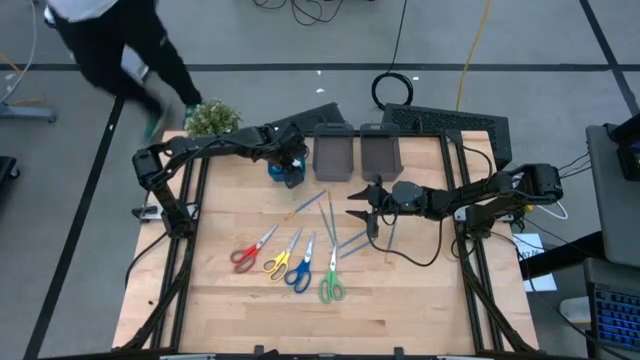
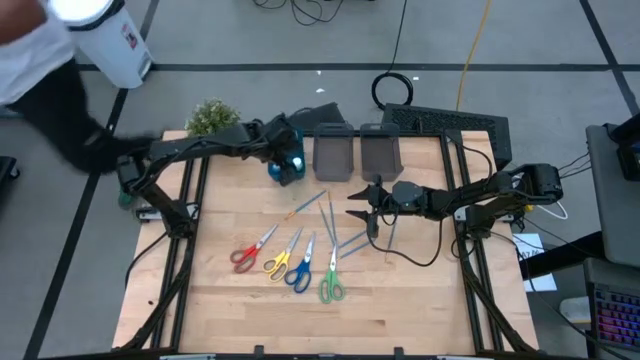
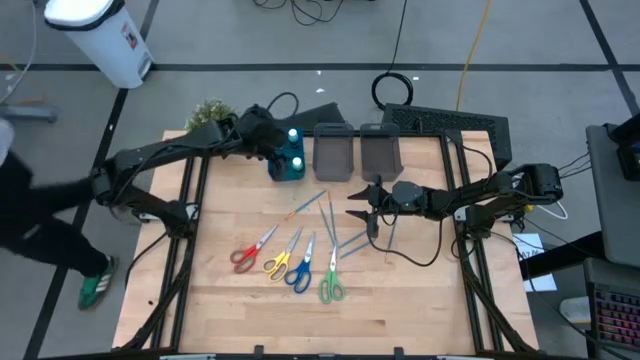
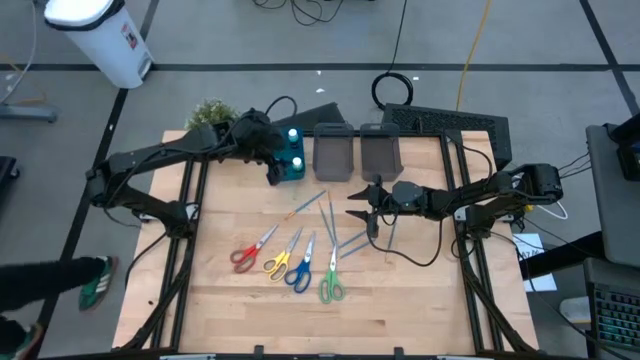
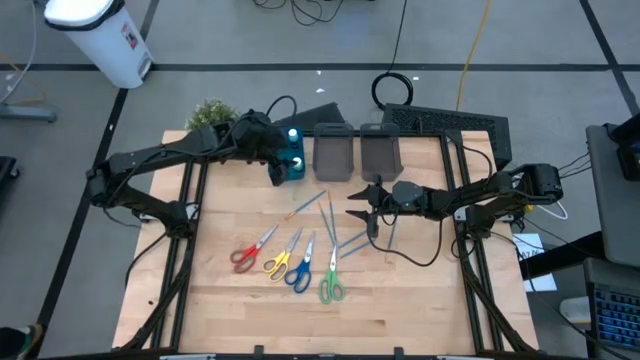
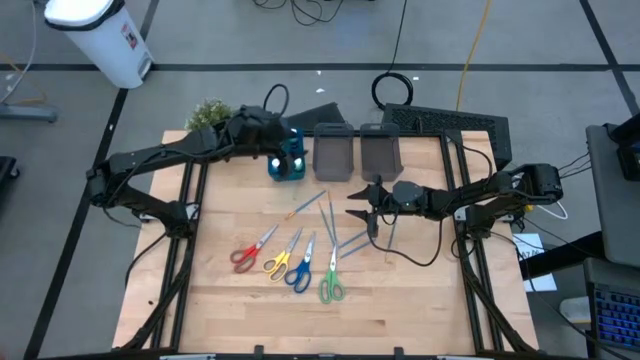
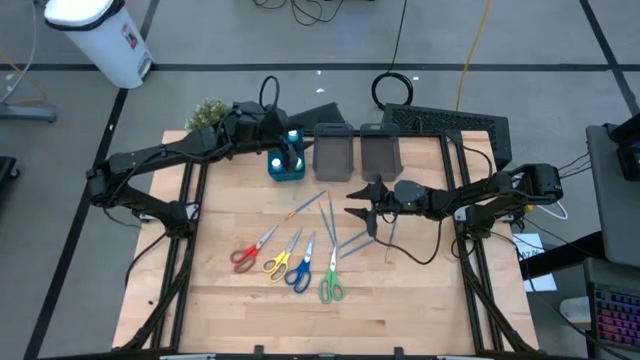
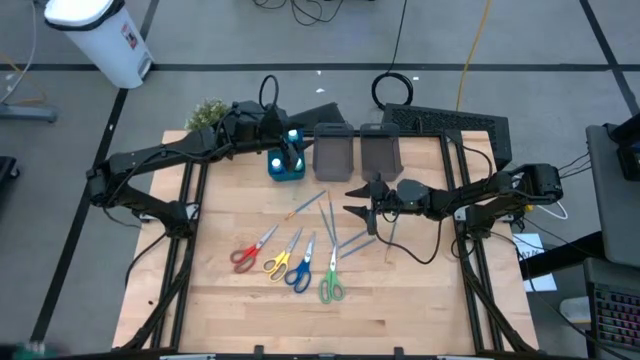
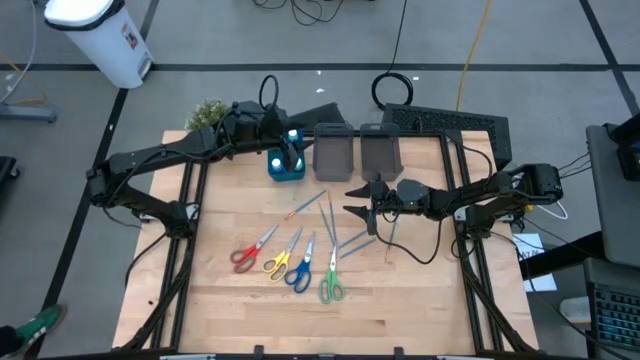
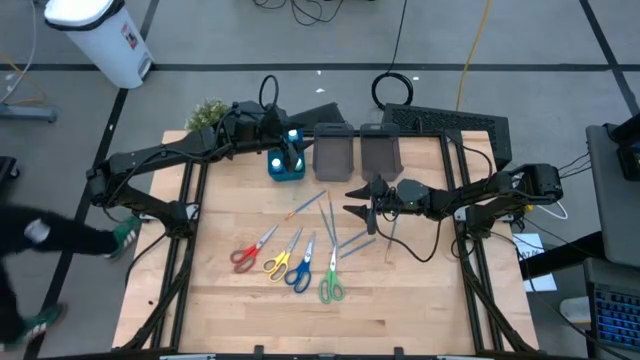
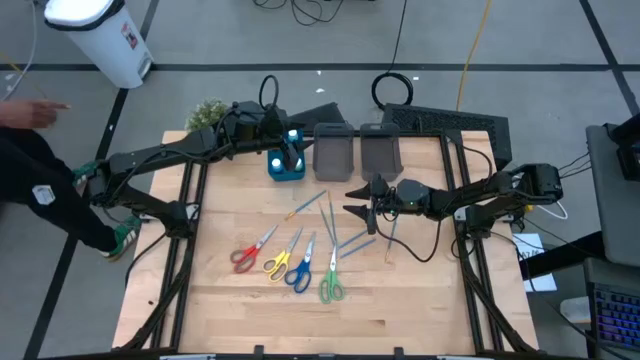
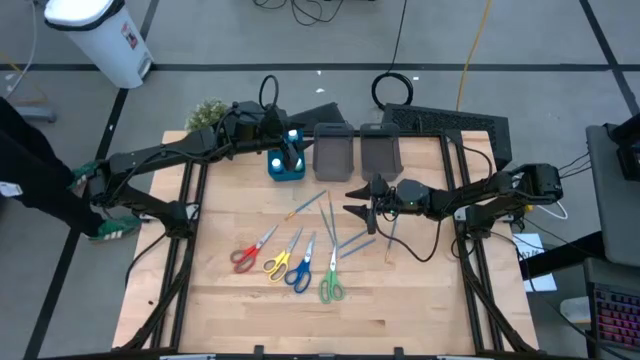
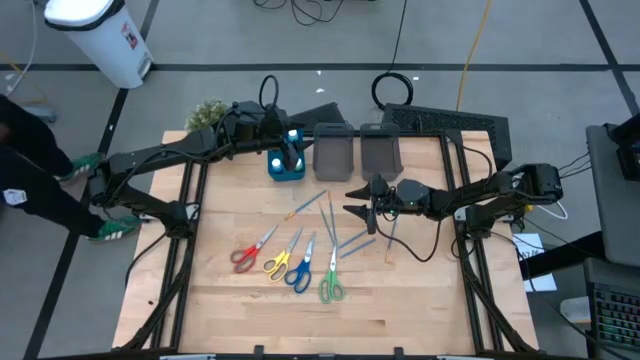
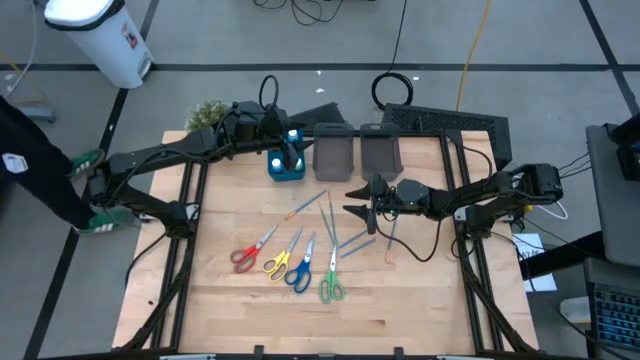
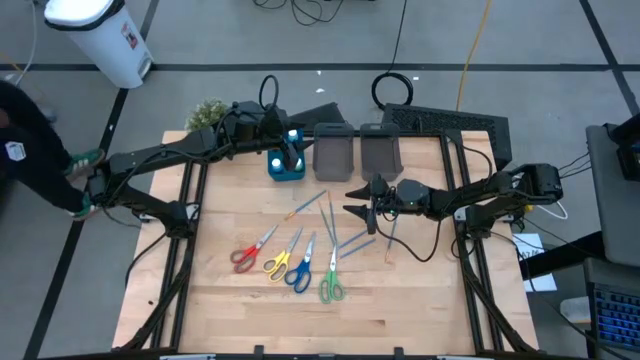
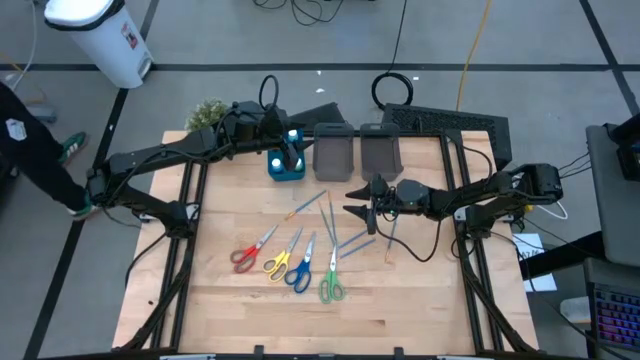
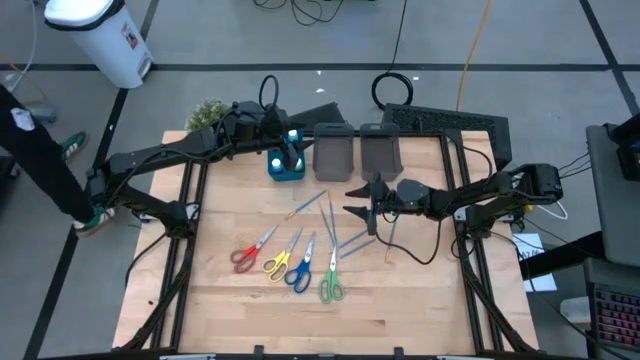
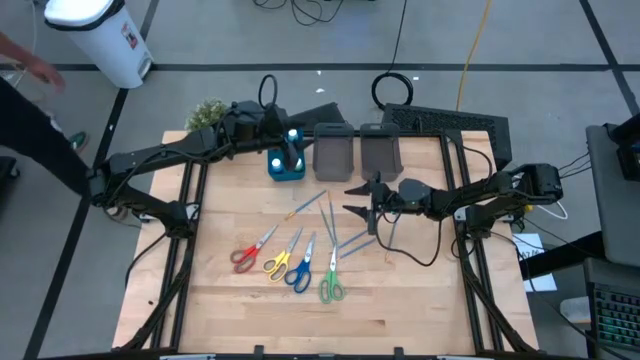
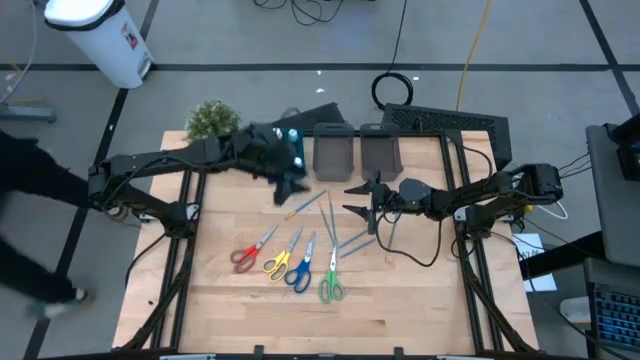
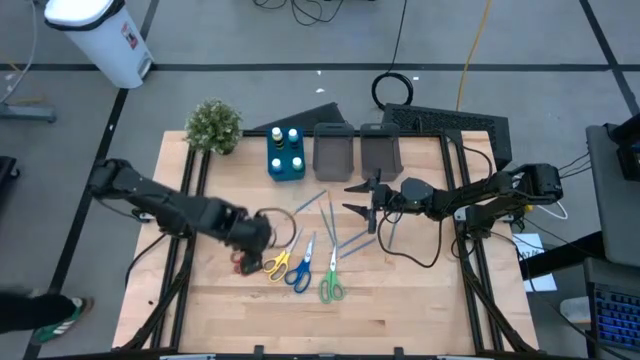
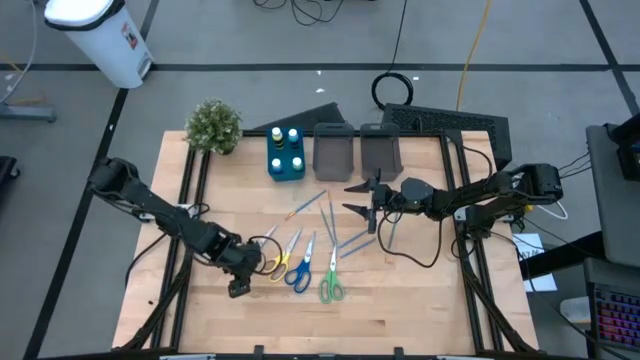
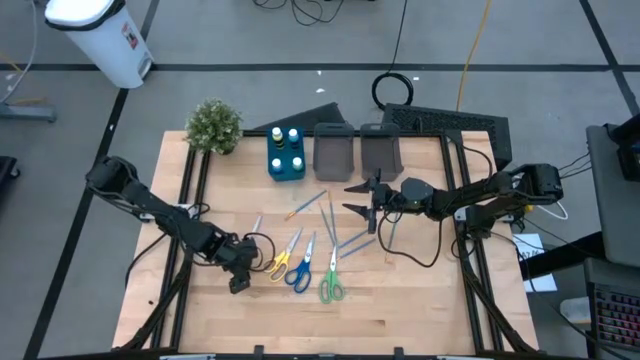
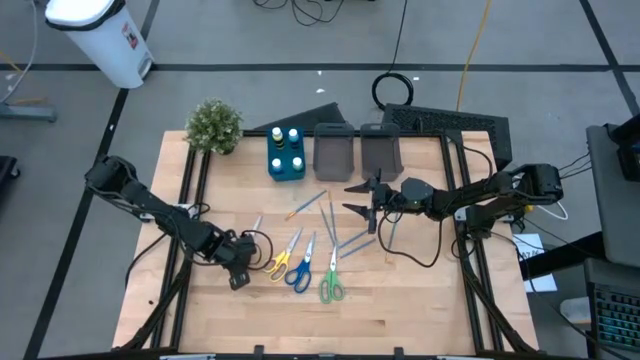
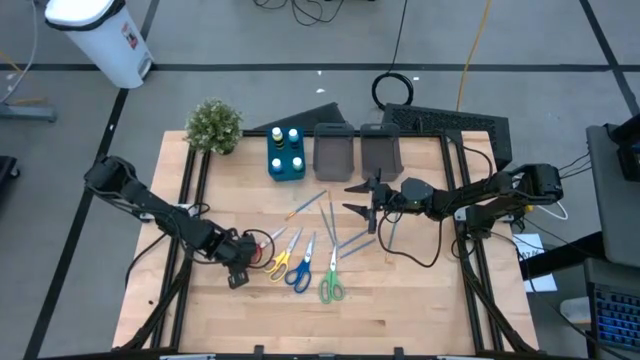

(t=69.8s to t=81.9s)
Task: Pick & Place Paint Supplies
Put the red scissors into the left black bin

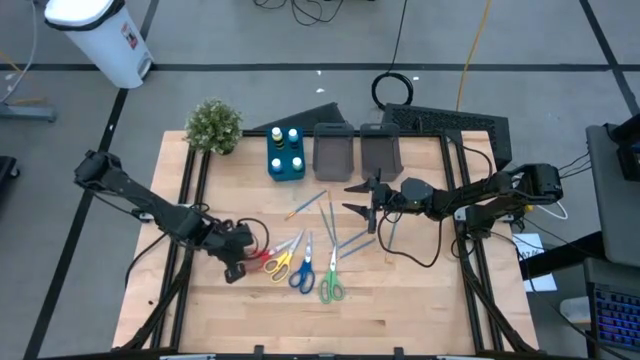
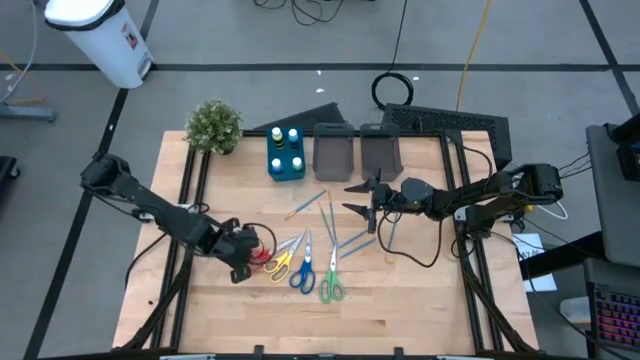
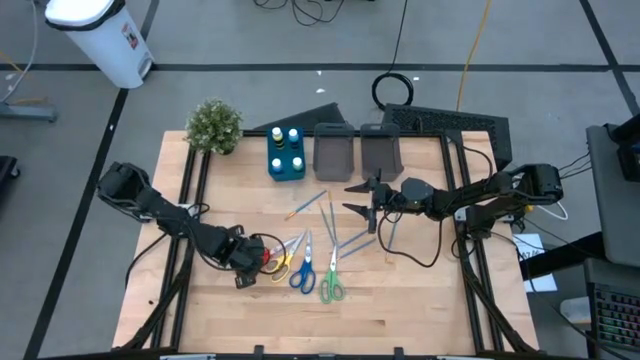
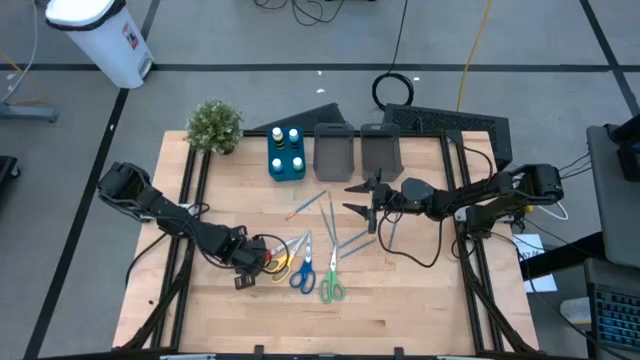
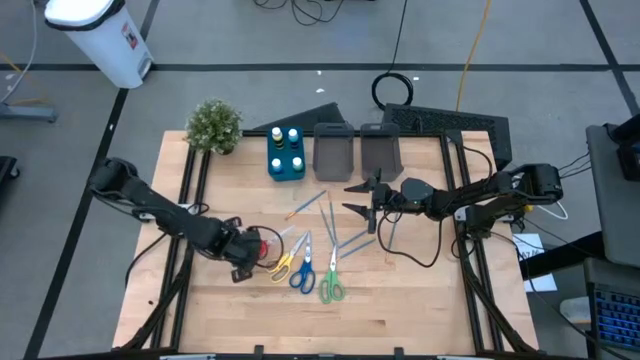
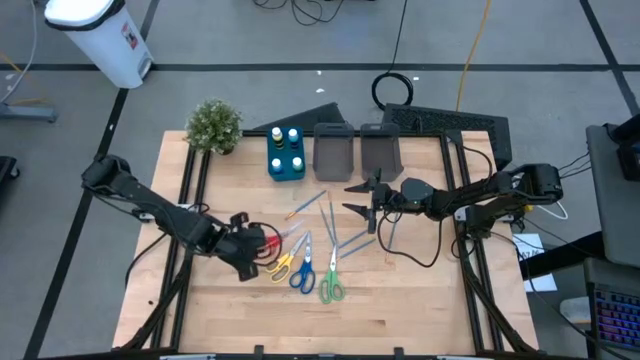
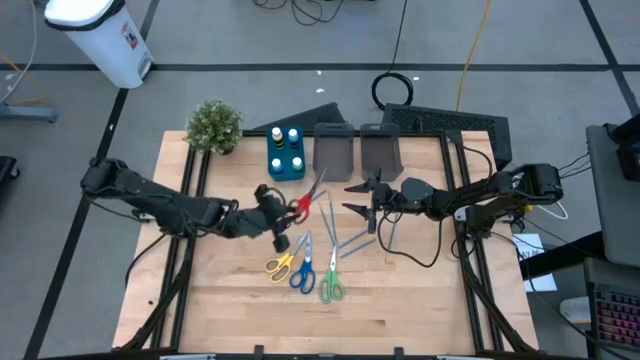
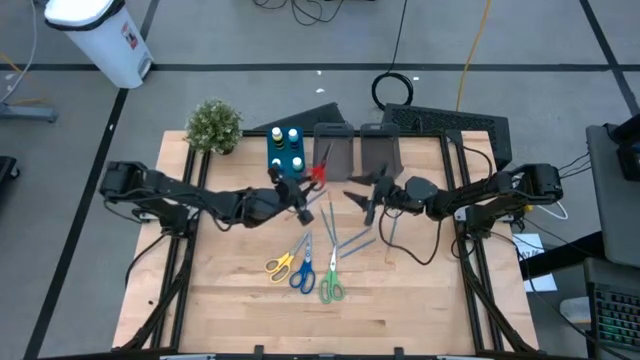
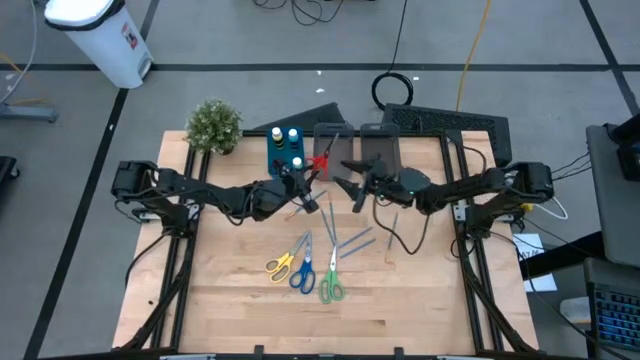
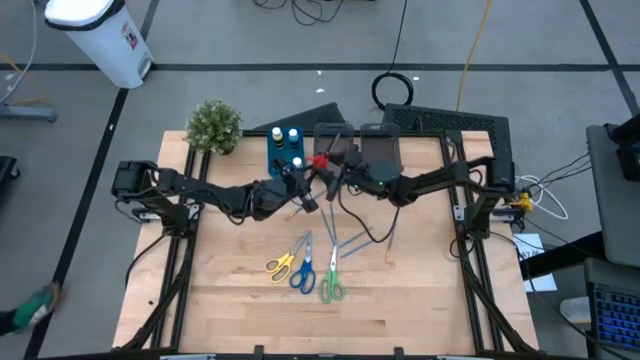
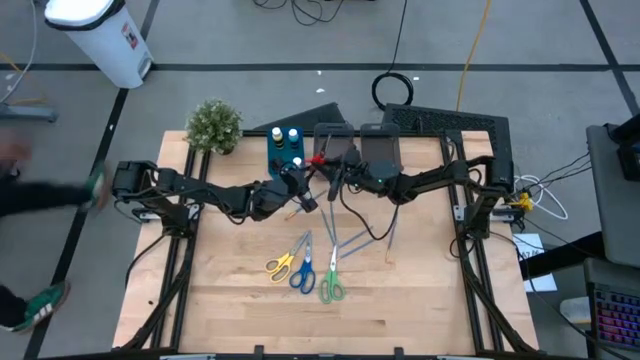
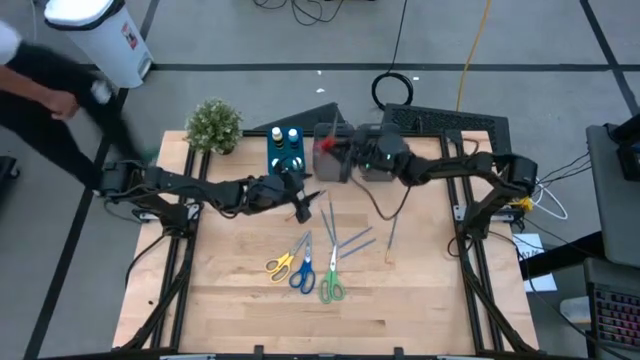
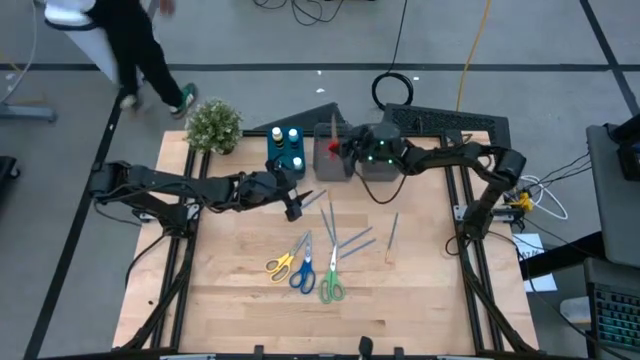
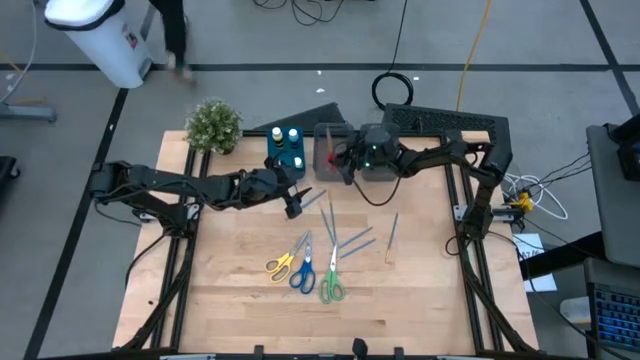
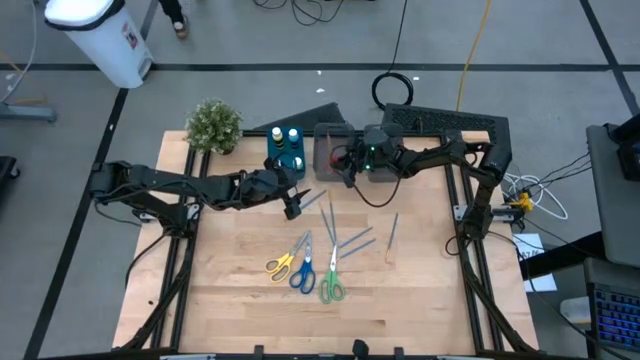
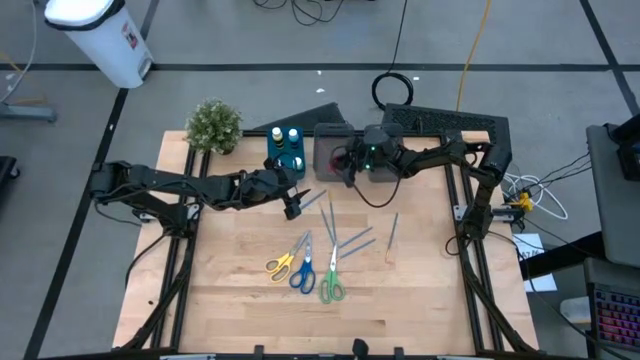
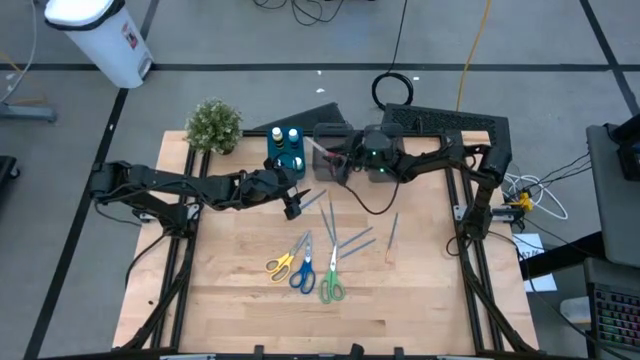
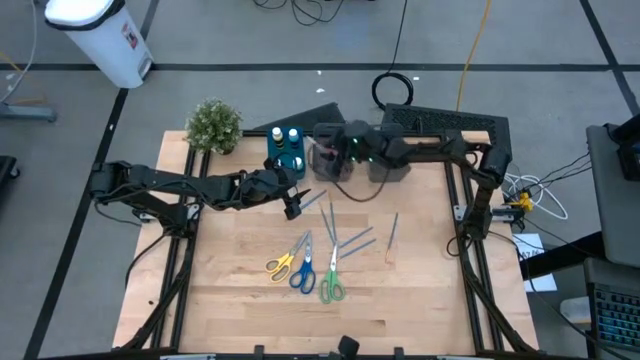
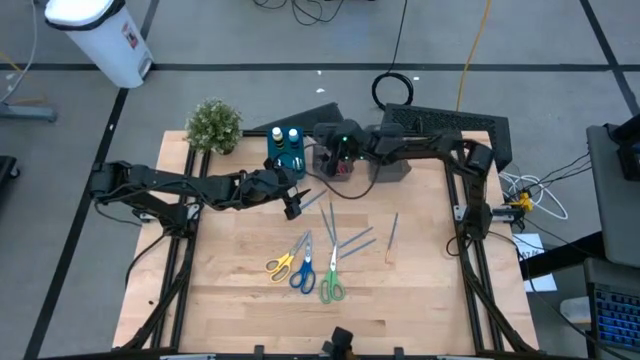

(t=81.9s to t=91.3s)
Put the red scissors into the left black bin

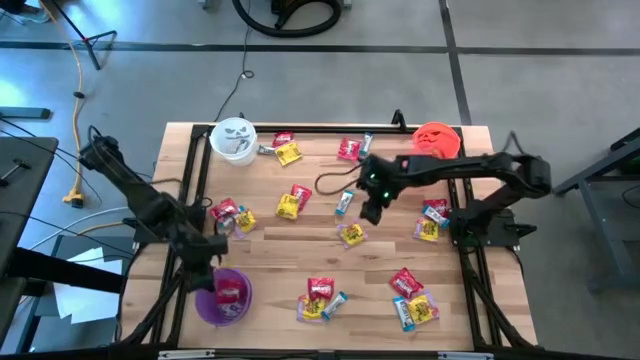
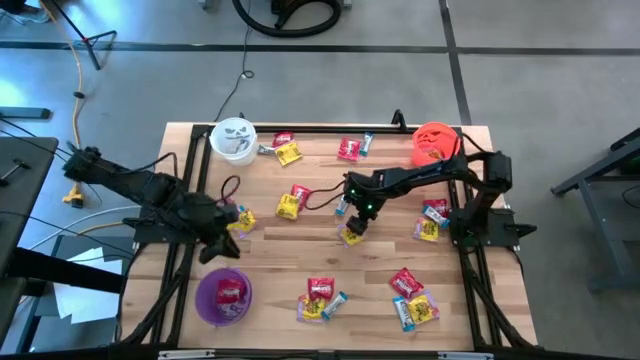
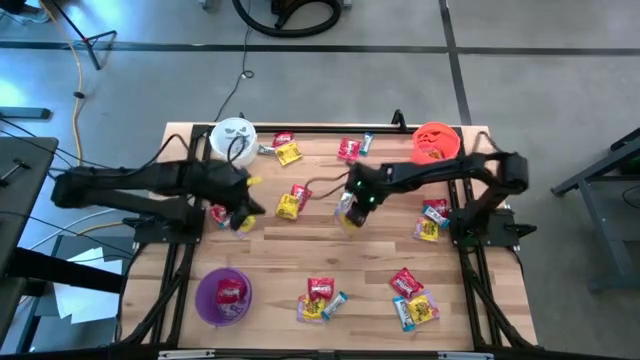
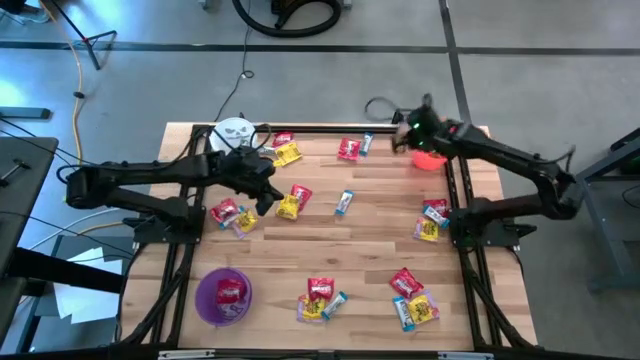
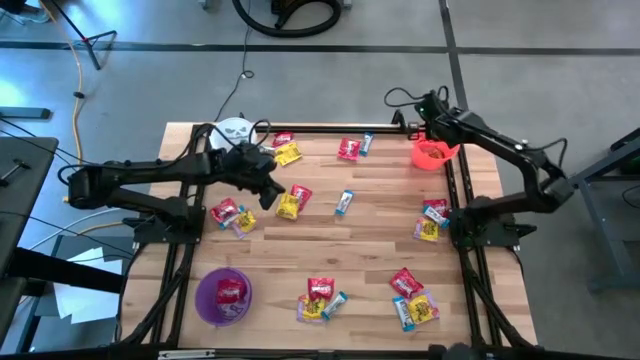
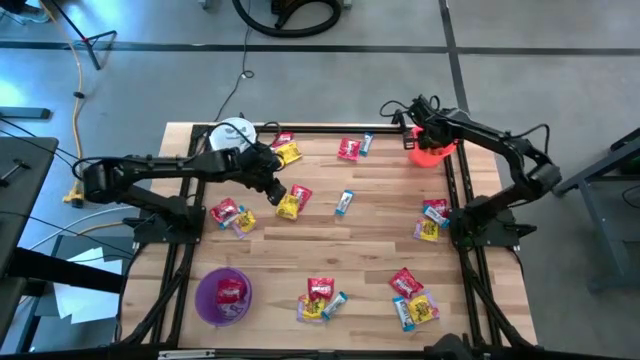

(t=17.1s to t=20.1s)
Task: Sort candy
Put the yellow candy into the orange bucket
